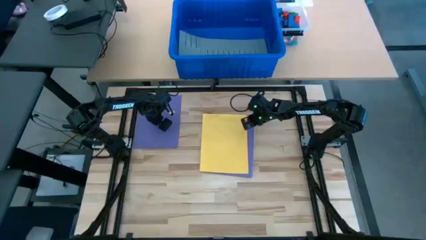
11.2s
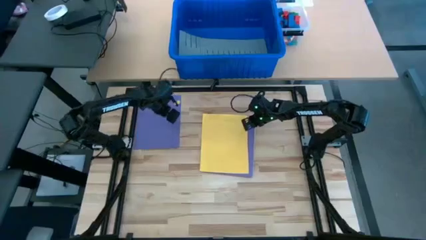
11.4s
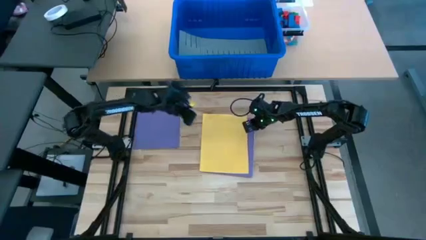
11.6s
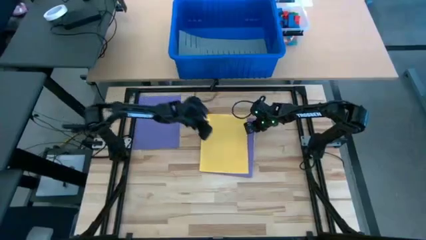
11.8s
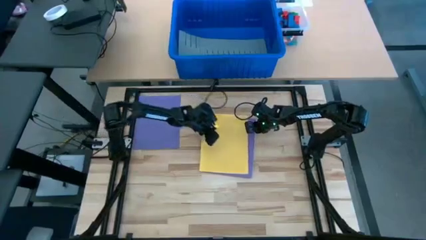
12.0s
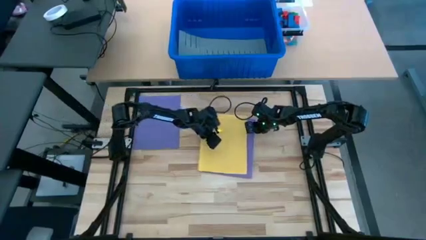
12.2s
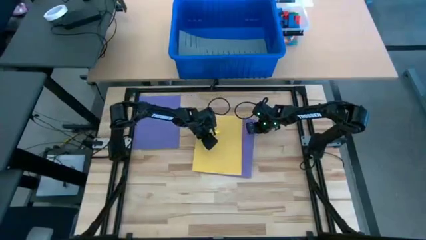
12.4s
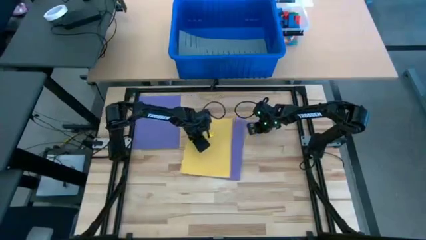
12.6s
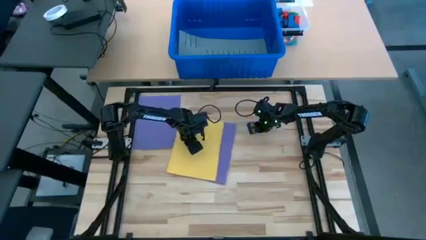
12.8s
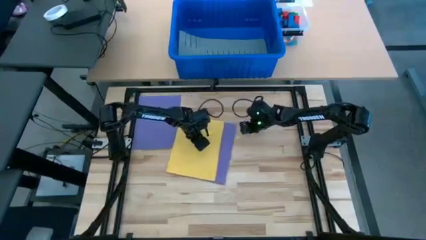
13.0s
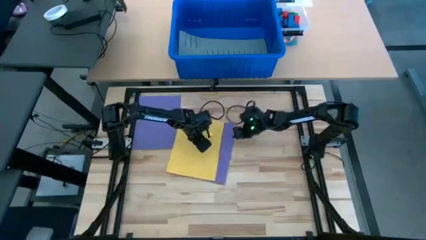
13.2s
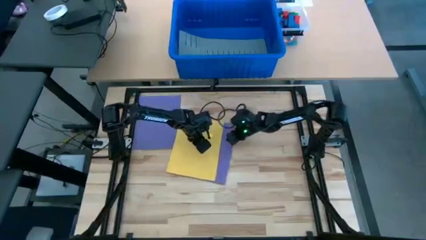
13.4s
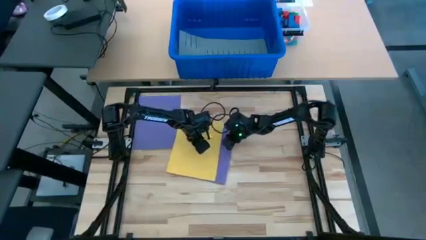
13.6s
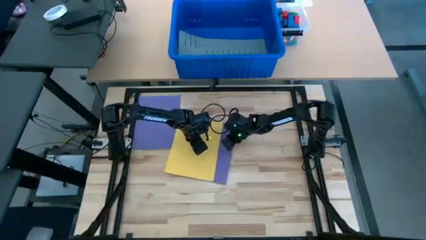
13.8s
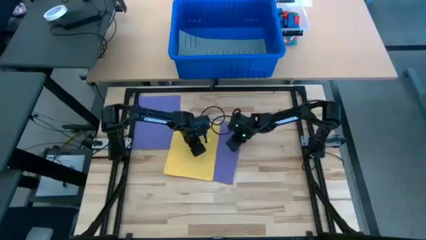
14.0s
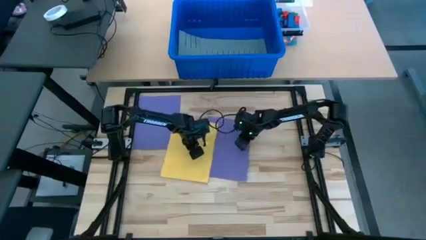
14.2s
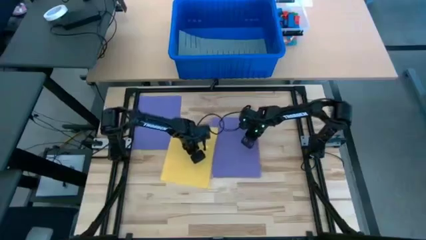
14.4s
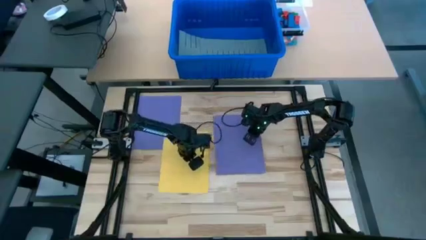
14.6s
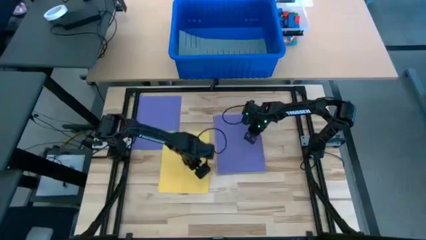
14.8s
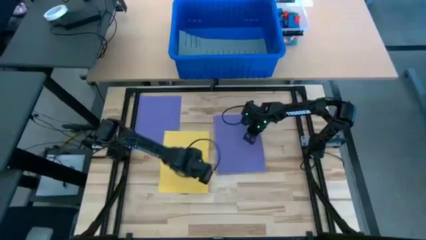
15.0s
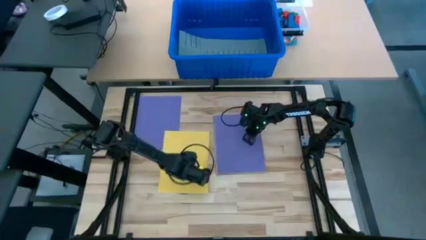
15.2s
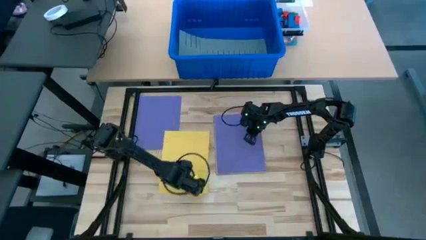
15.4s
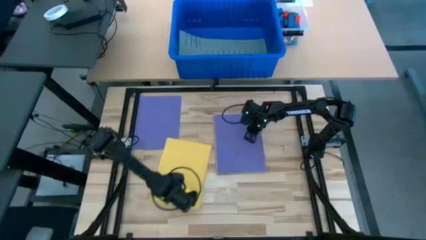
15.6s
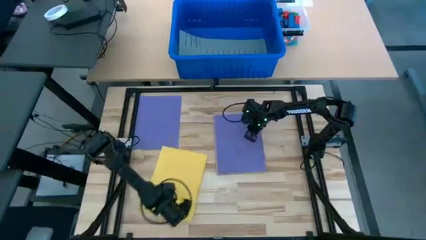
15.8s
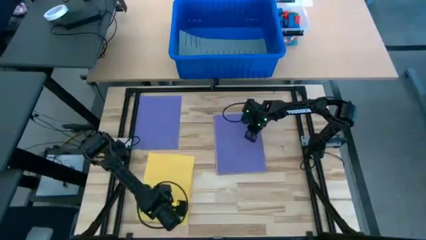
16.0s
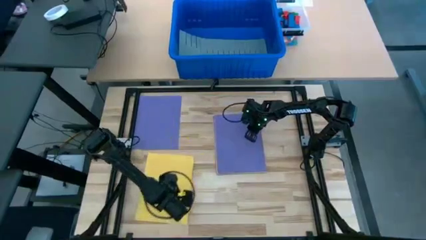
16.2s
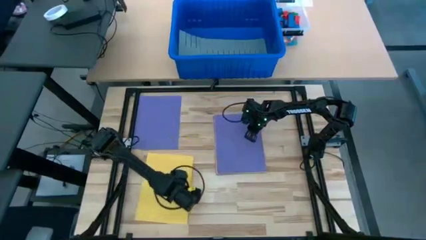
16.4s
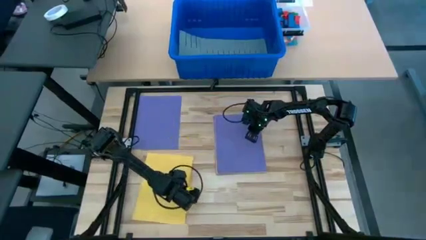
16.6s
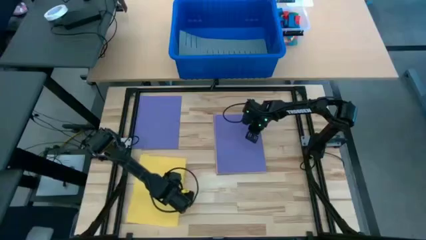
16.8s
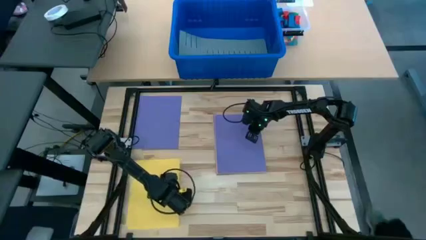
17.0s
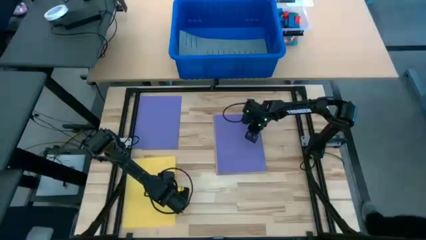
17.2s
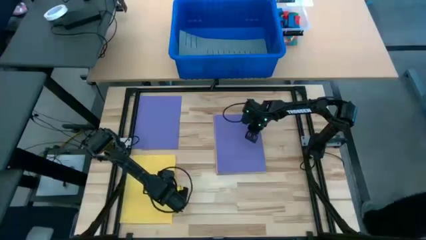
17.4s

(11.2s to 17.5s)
Task: Organize paper
Prepare the yellow colored paper

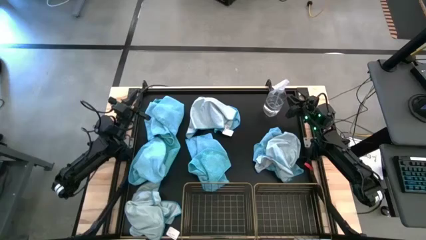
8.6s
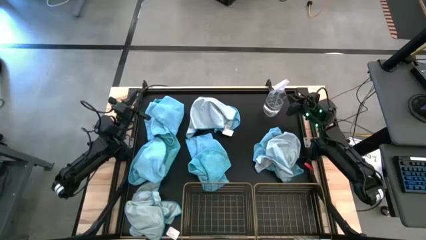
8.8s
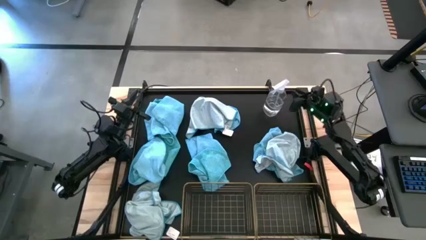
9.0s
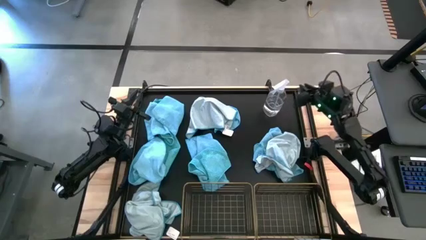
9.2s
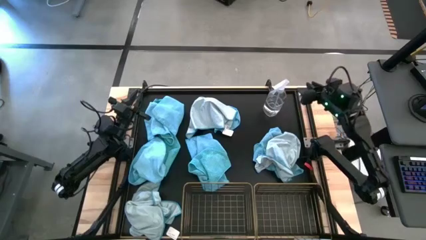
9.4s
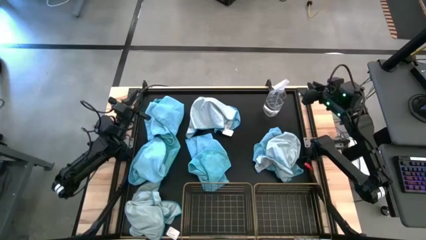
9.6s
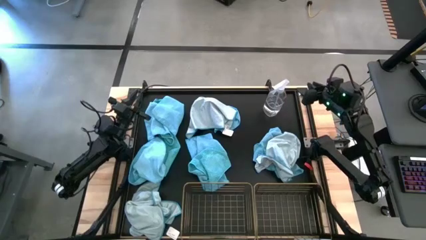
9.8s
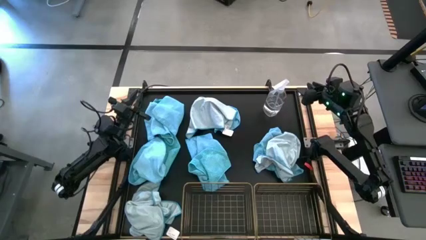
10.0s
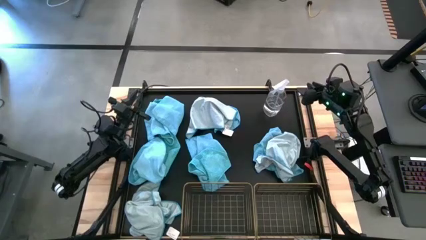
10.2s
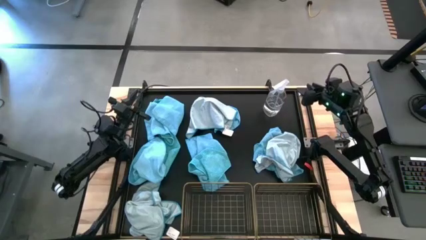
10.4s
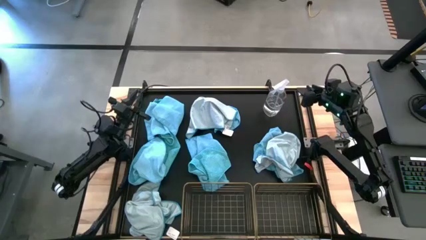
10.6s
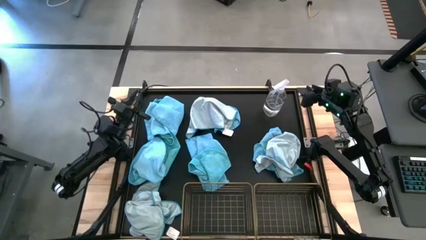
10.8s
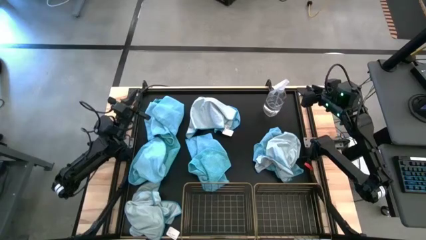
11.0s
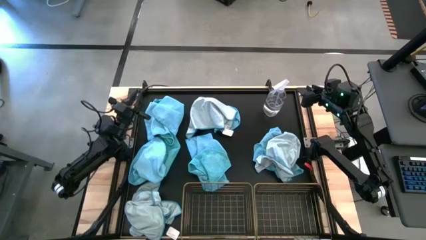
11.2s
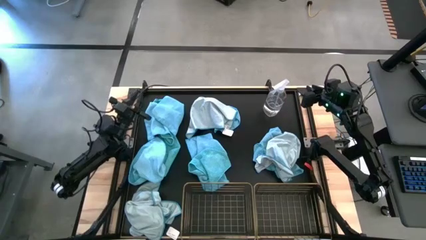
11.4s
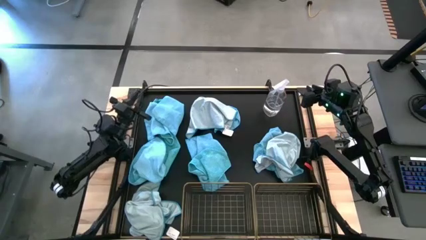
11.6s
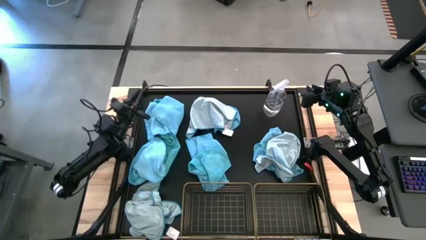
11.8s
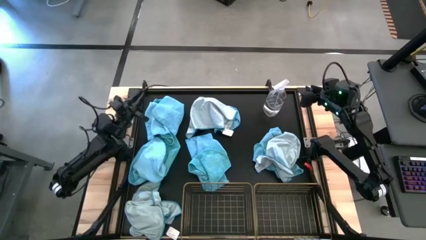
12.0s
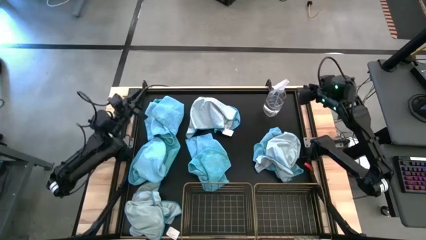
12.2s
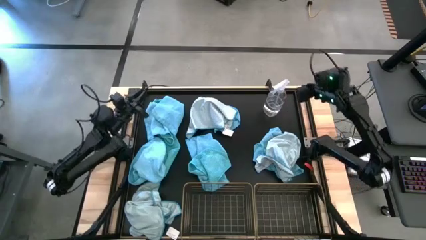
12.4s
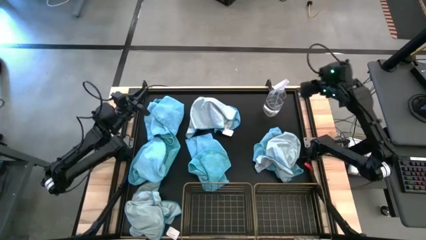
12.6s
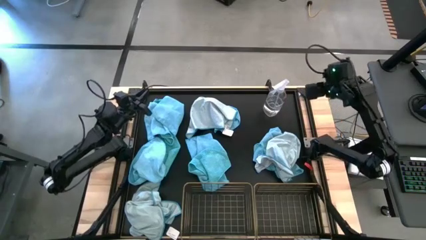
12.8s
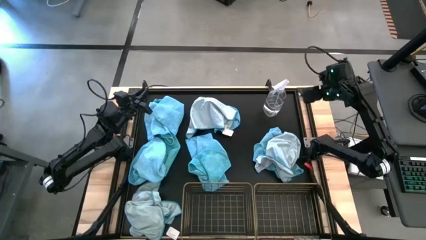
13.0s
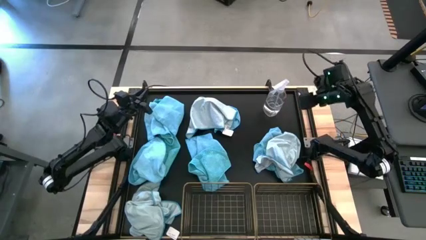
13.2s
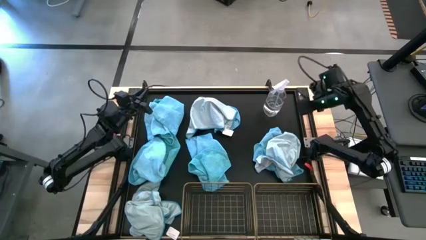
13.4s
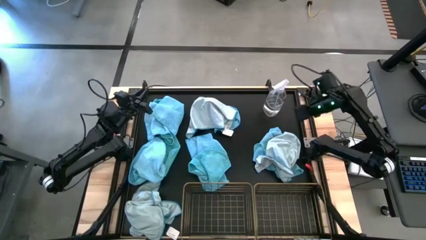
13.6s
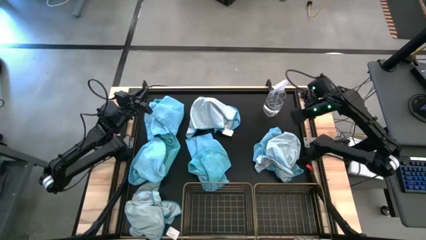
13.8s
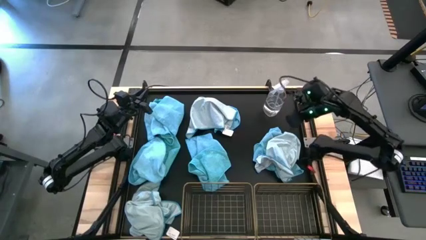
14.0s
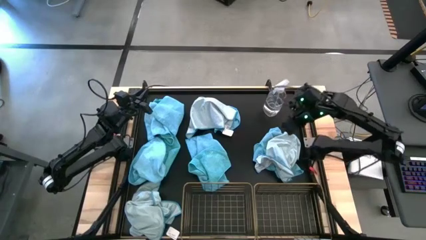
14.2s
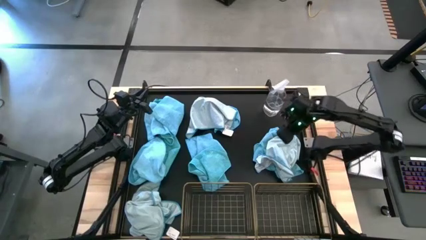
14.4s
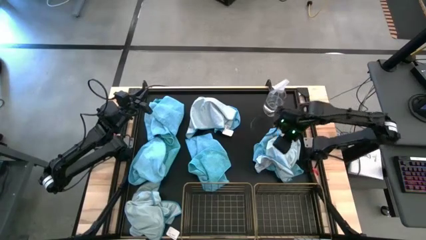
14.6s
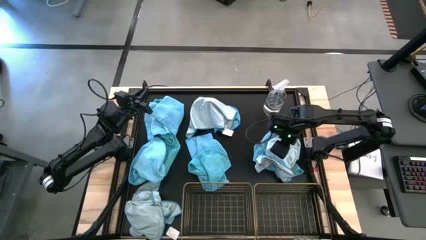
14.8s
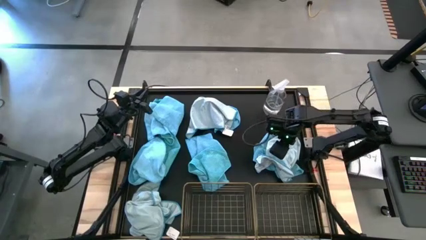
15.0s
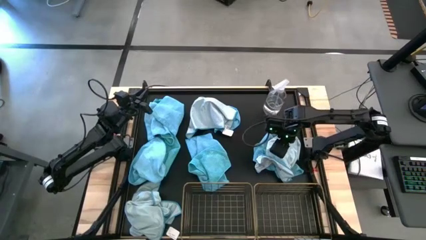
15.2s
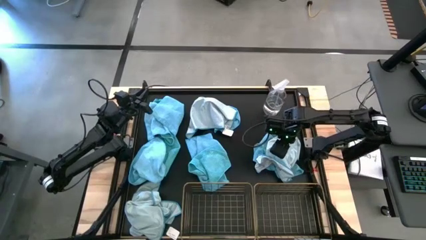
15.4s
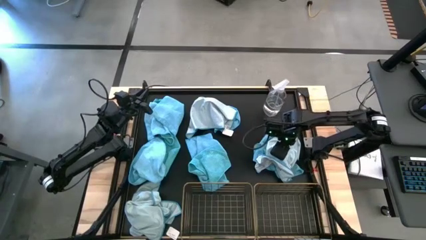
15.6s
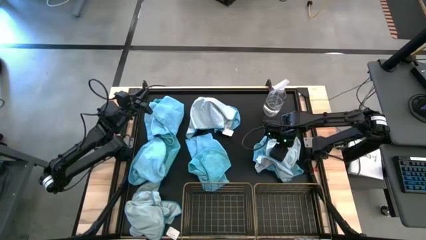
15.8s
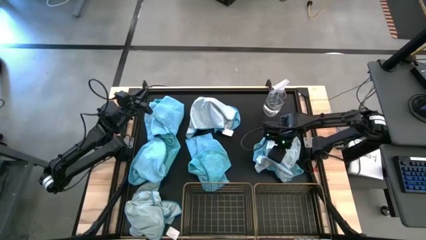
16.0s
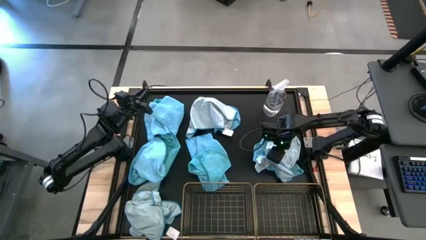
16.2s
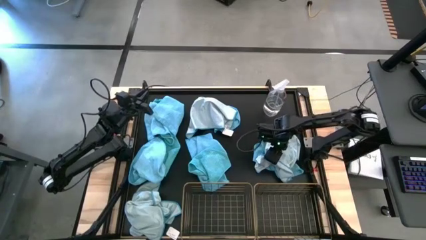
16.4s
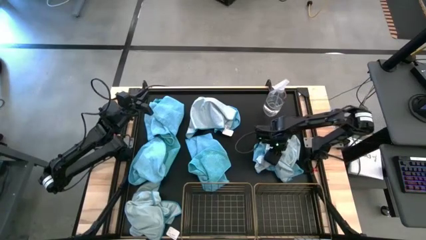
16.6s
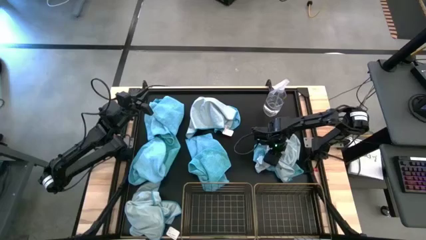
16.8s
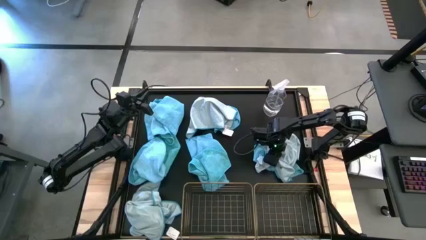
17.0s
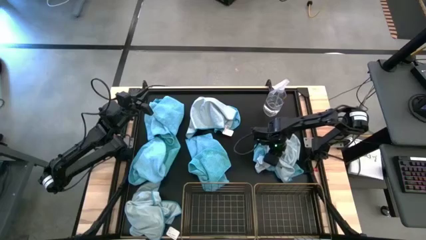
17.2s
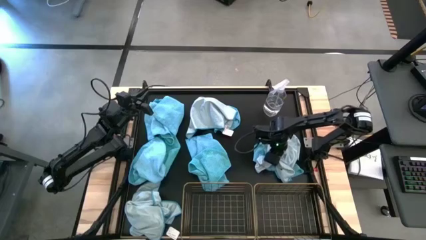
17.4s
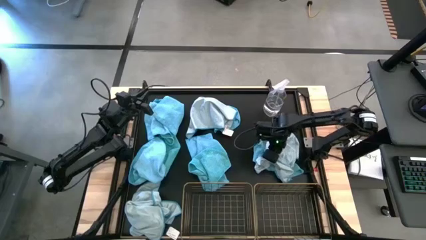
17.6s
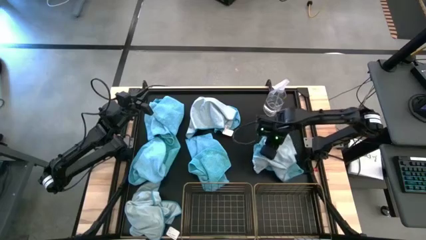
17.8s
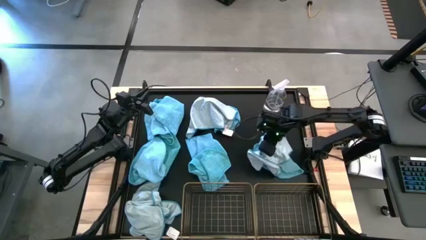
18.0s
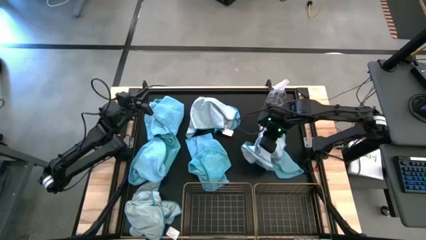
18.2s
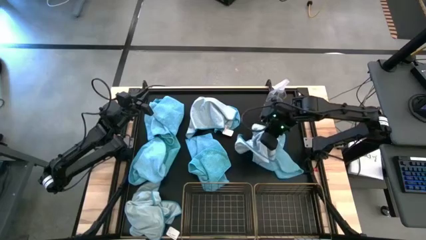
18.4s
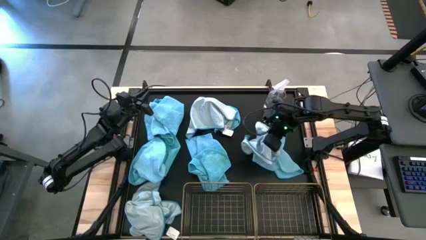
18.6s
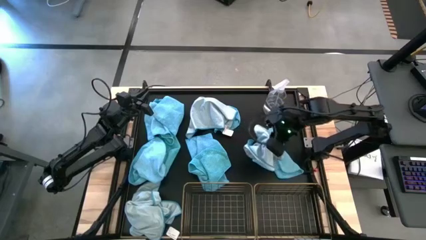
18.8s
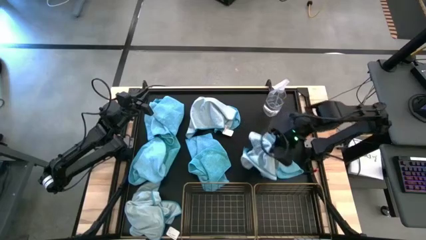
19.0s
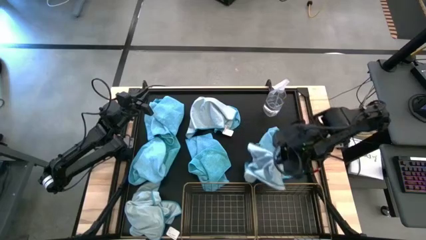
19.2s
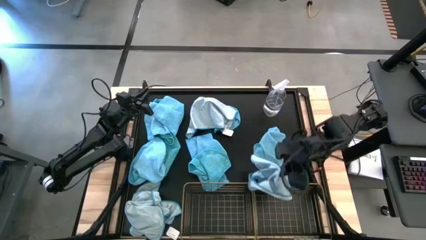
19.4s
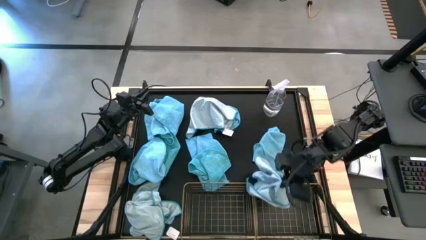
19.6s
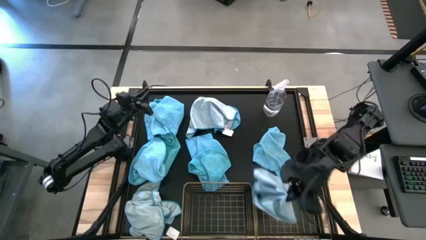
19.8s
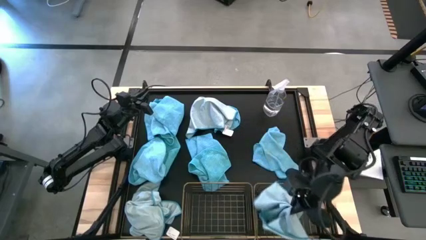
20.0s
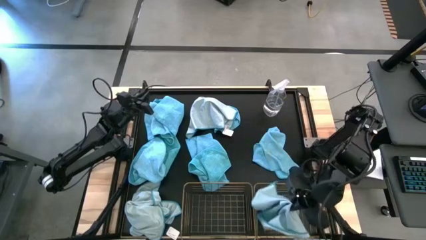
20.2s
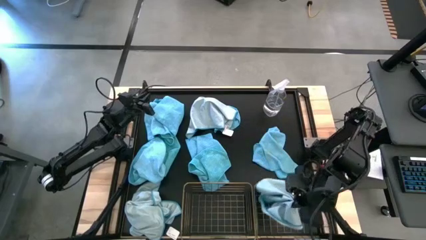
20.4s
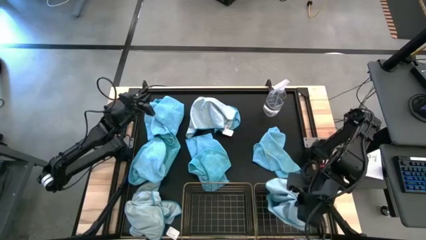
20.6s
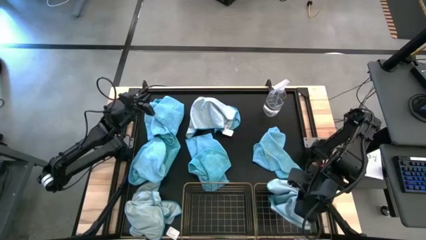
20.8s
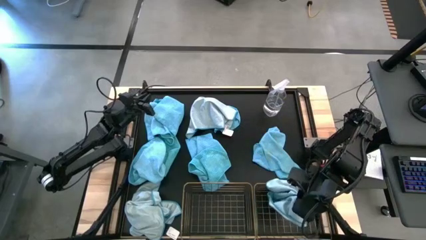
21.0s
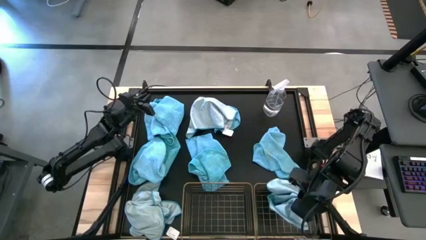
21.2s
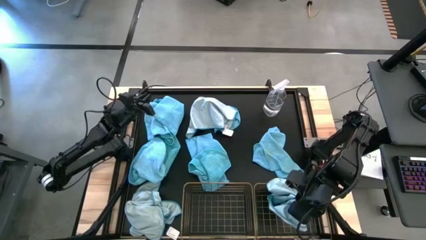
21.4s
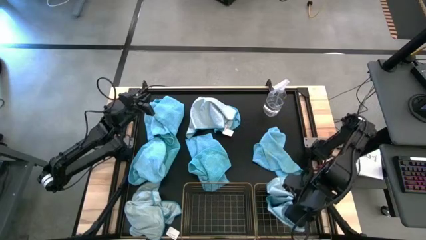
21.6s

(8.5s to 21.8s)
Task: Sort microfiber towel by color & place in baskets
Put the light blue towel into the right wire basket
